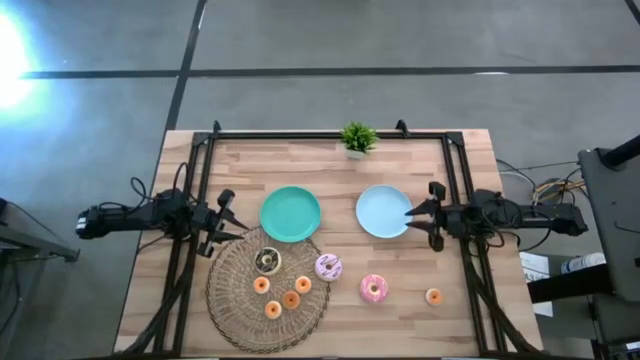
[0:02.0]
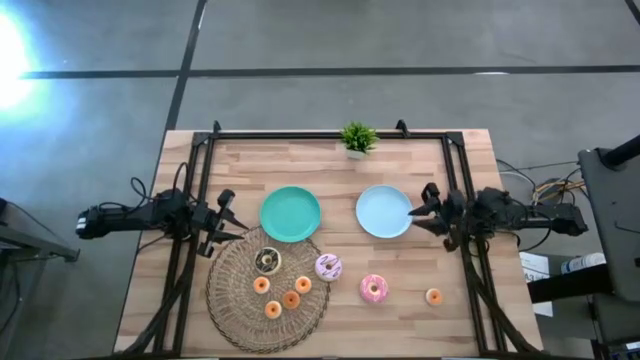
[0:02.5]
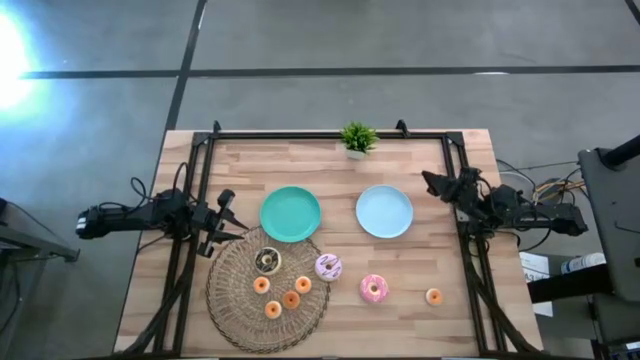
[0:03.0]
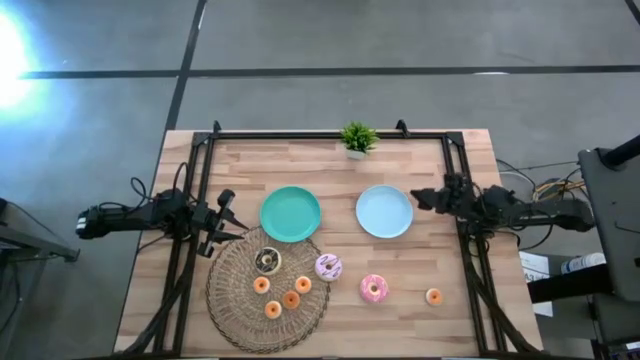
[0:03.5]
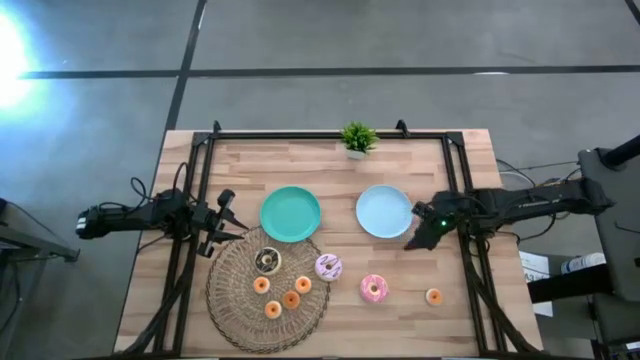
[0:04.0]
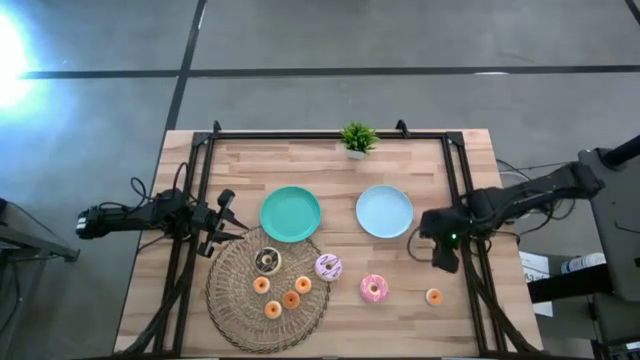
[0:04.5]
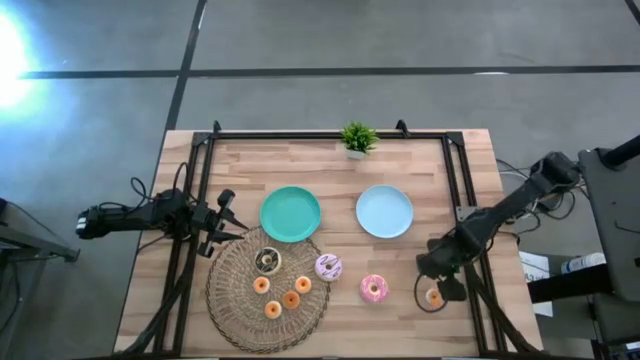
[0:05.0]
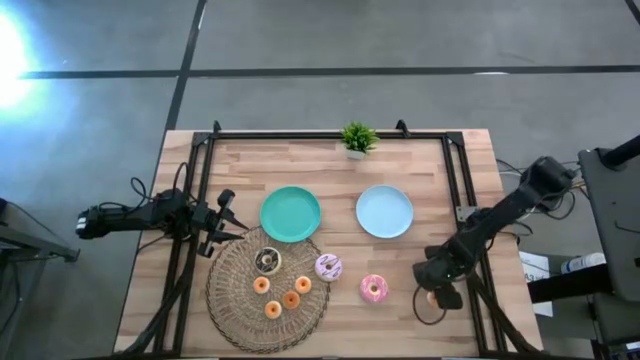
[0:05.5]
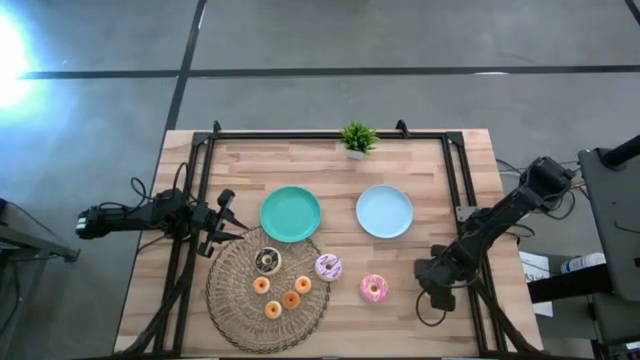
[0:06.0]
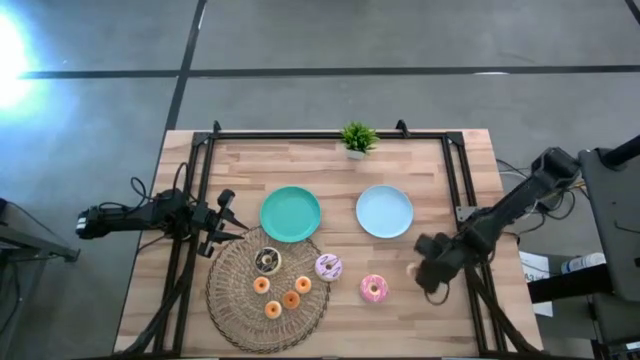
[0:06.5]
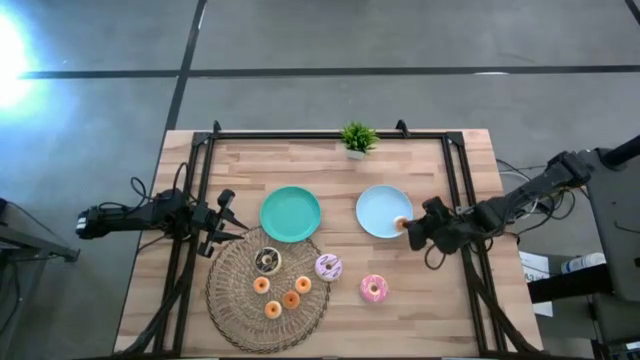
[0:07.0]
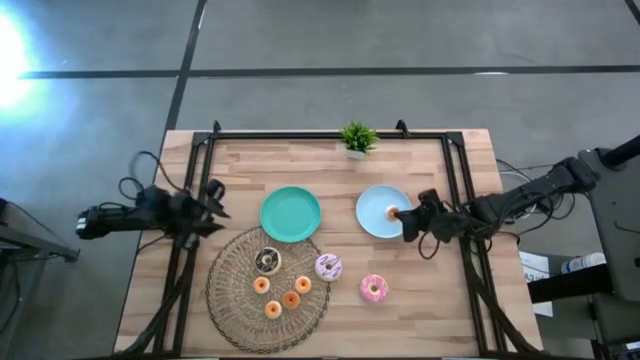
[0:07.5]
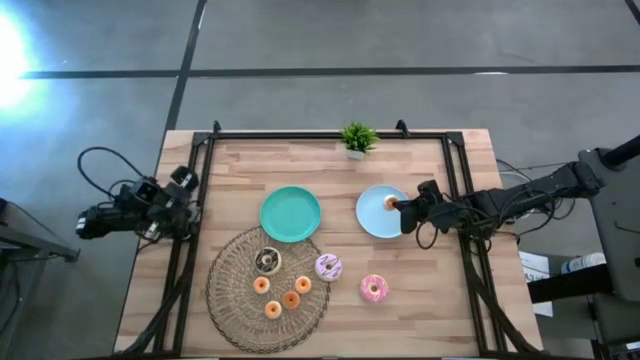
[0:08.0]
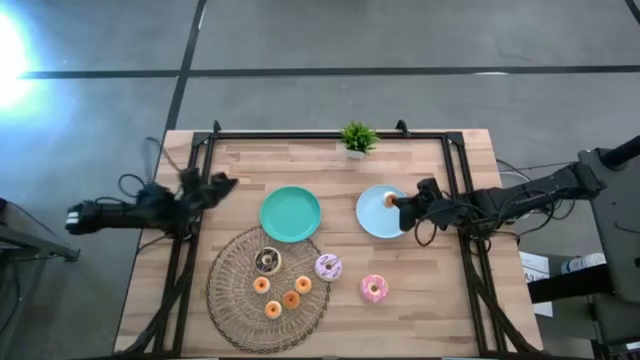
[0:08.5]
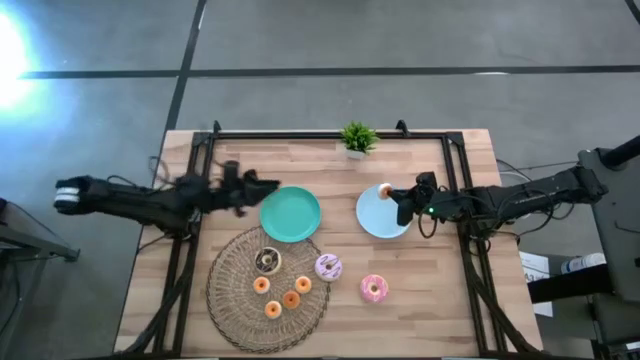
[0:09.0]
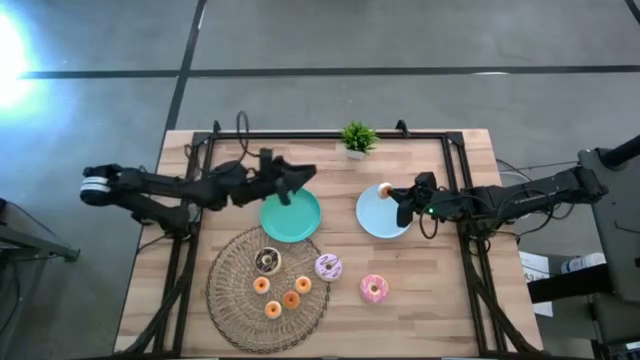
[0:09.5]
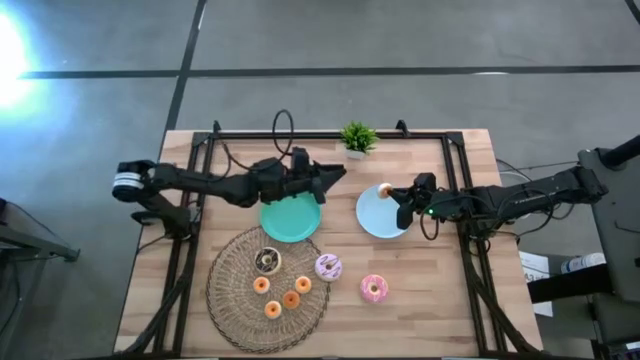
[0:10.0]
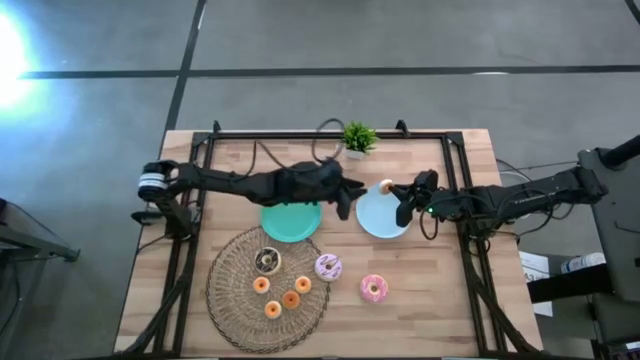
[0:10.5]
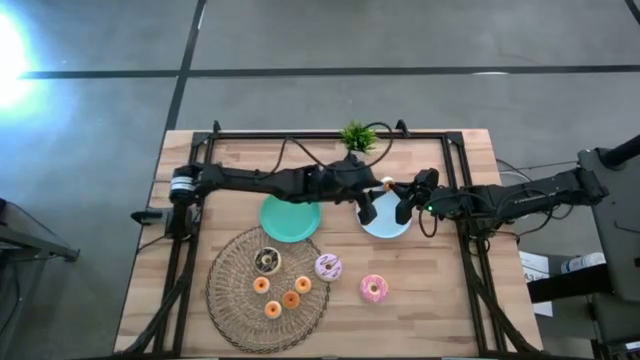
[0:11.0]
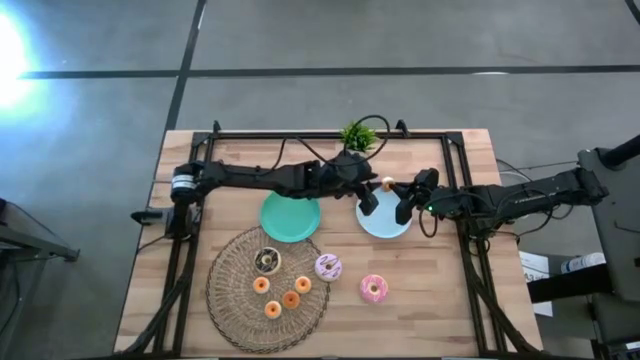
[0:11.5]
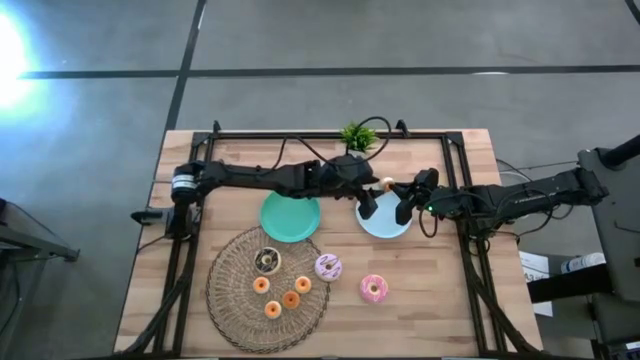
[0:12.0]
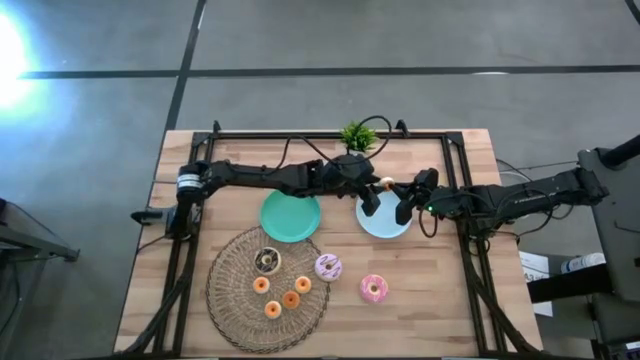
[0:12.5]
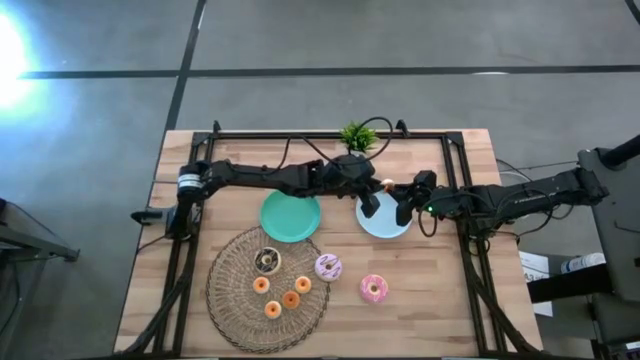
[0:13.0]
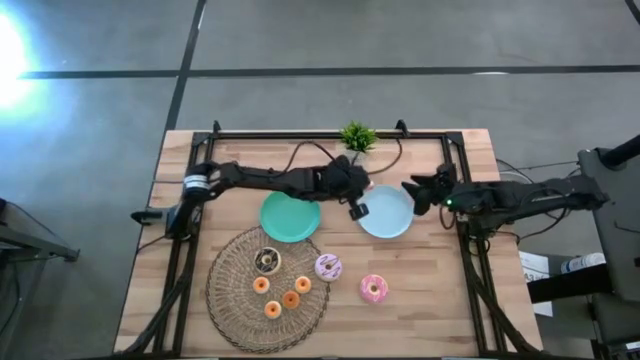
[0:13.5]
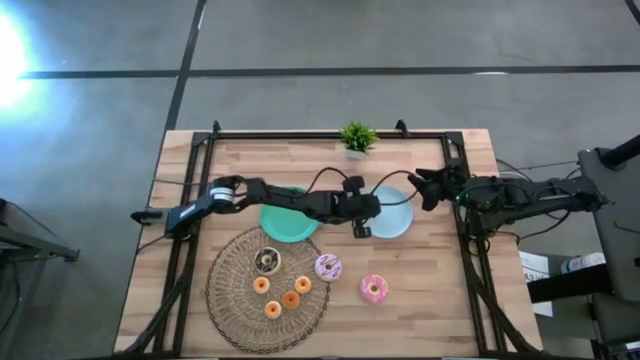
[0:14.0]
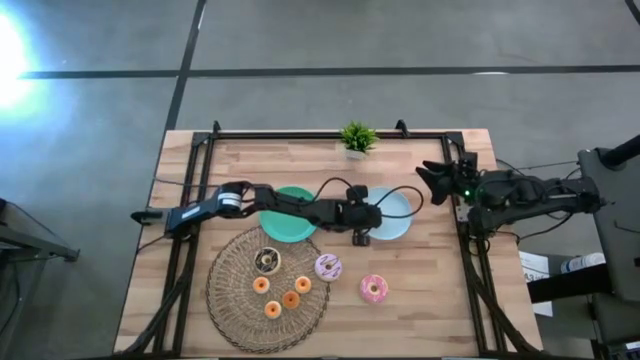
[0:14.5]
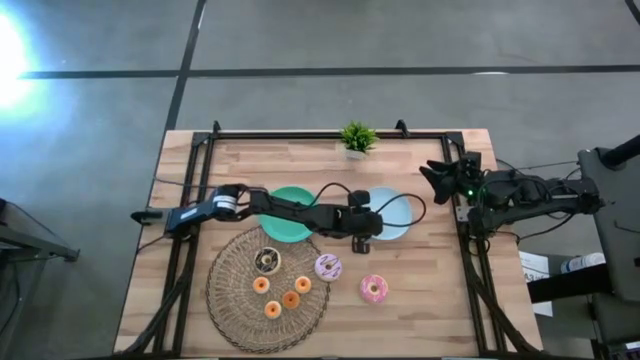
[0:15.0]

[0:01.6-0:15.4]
Task: Pick & Place donuts
Put the small white donut into the blue plate

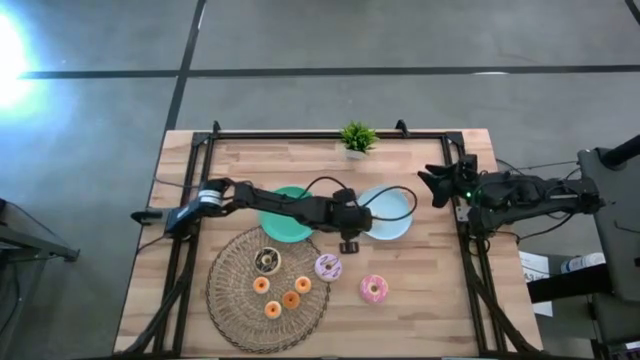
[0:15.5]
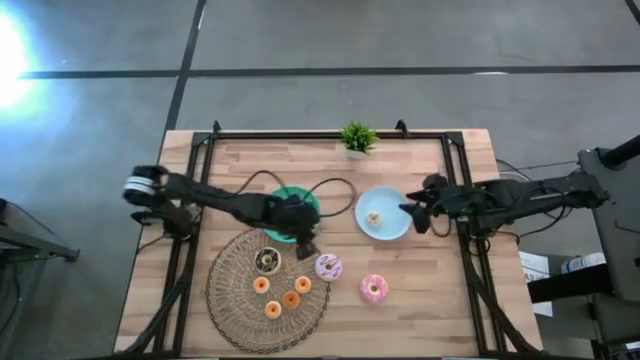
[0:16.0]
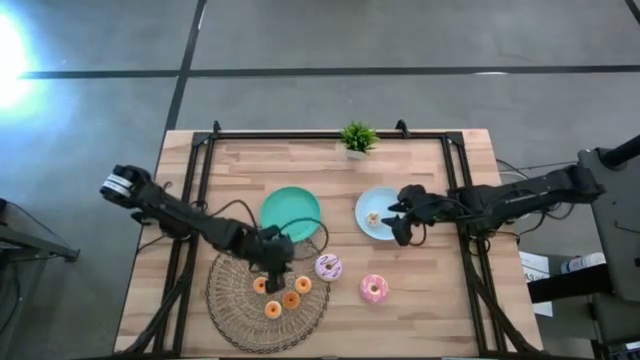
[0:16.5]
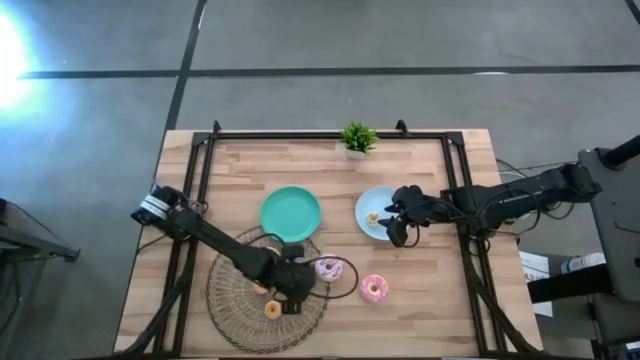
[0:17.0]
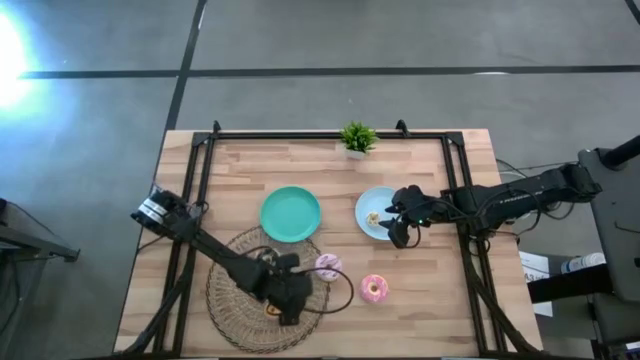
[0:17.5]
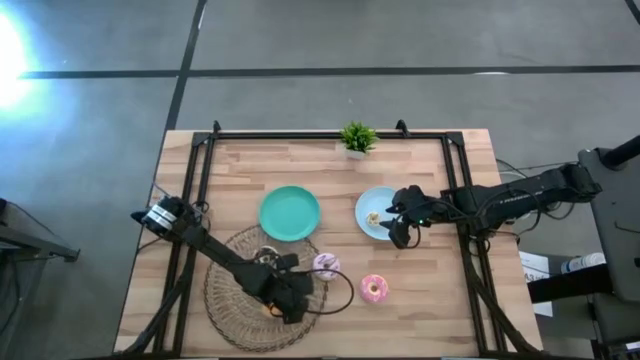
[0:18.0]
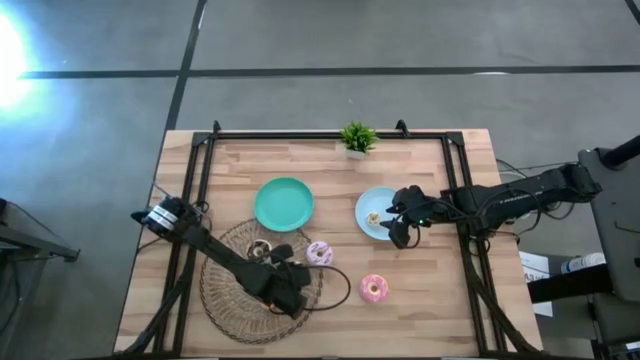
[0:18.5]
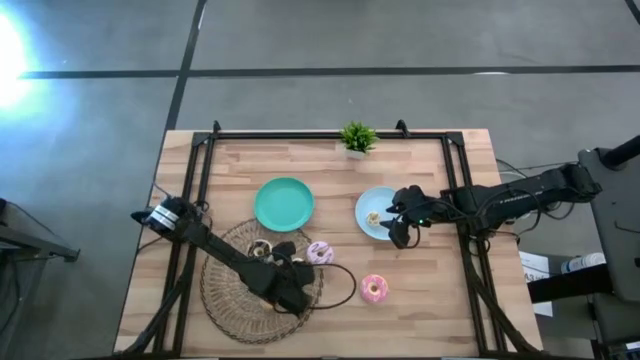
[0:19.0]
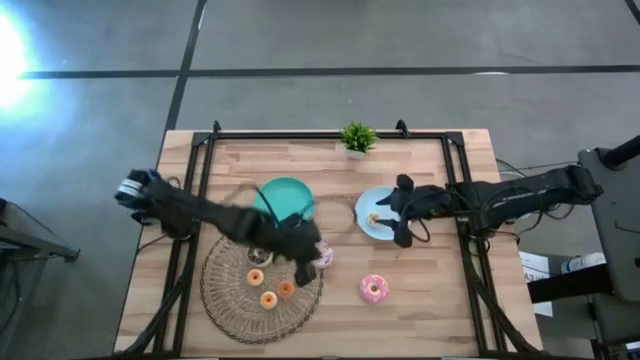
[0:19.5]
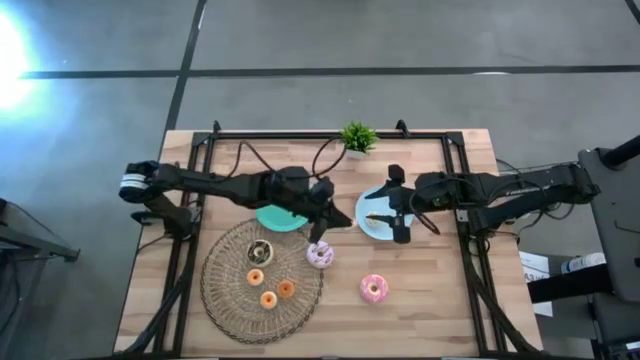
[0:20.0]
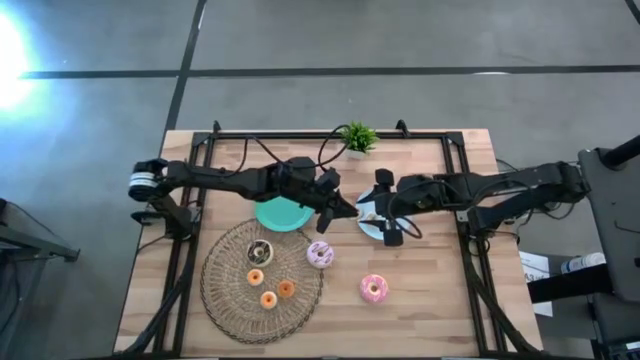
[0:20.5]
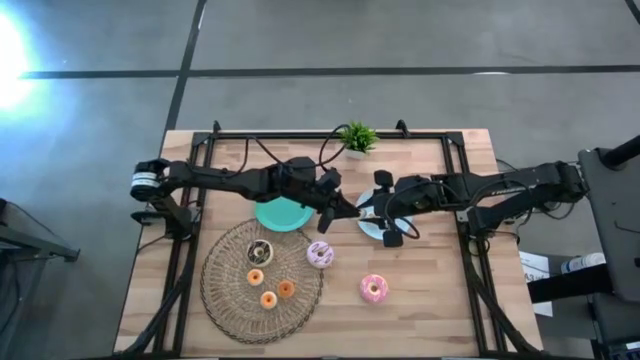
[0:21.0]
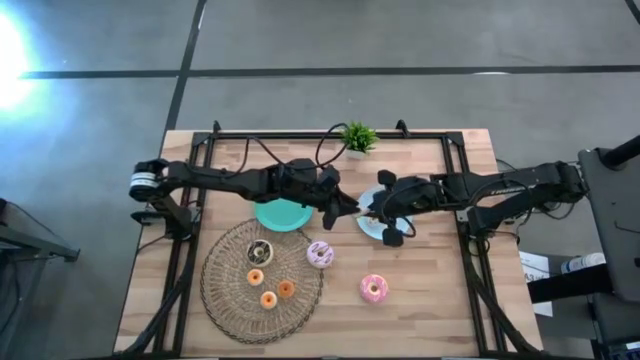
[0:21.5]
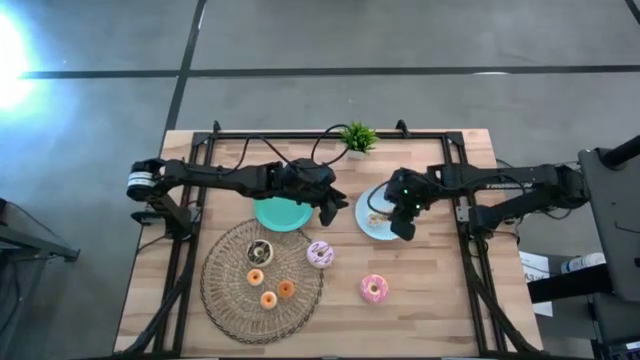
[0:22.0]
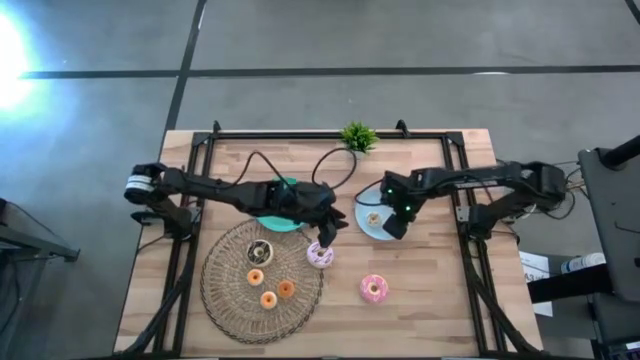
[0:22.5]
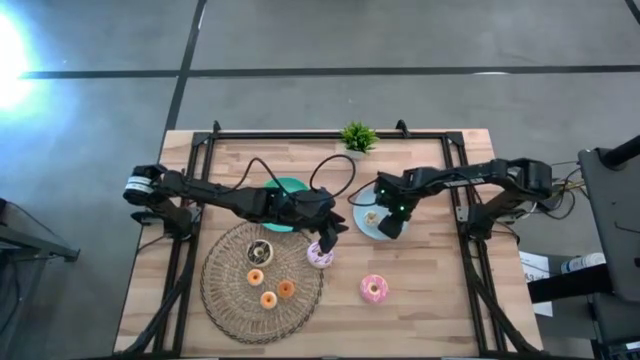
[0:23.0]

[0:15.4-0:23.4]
Put the small yellow donut into the blue plate
